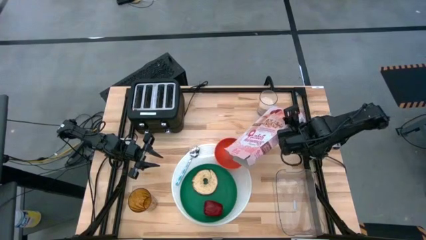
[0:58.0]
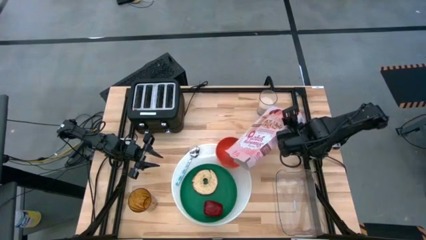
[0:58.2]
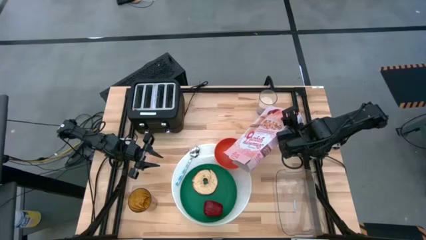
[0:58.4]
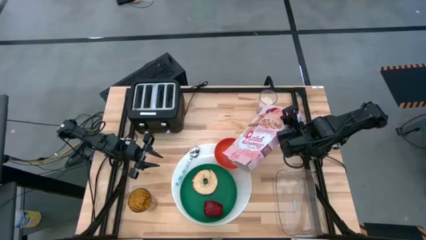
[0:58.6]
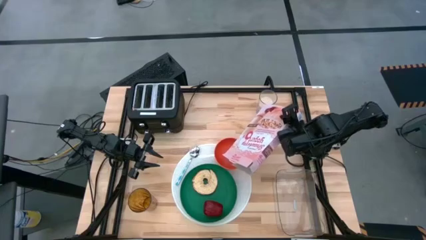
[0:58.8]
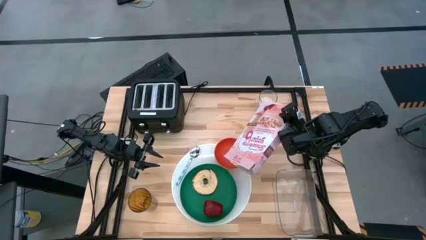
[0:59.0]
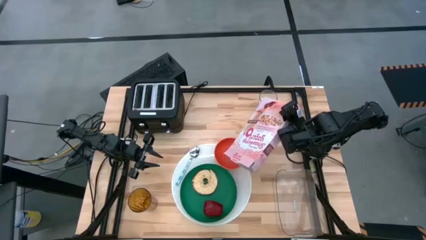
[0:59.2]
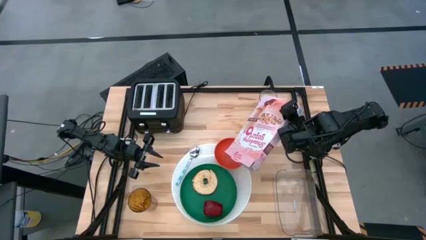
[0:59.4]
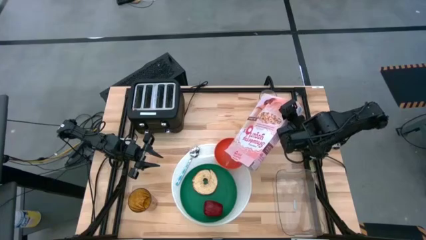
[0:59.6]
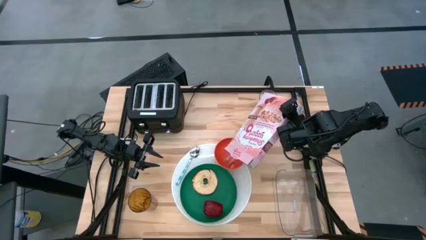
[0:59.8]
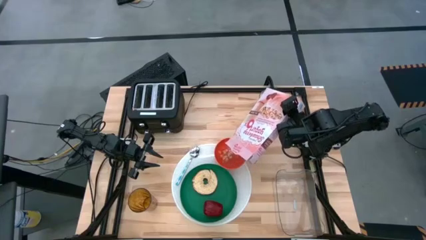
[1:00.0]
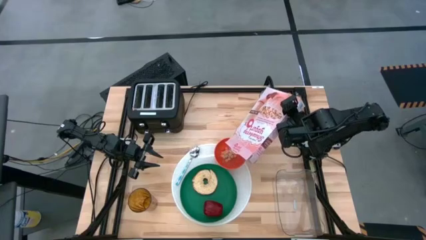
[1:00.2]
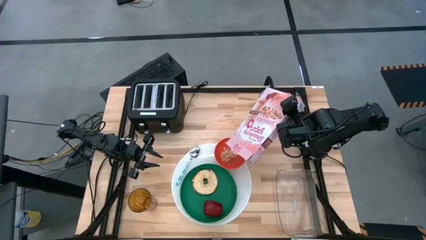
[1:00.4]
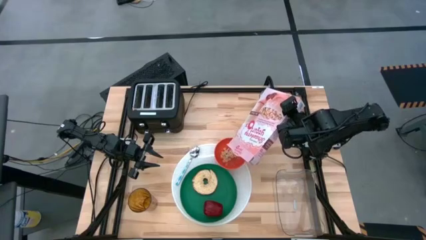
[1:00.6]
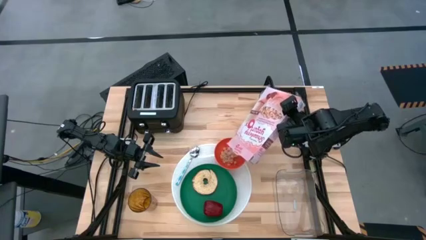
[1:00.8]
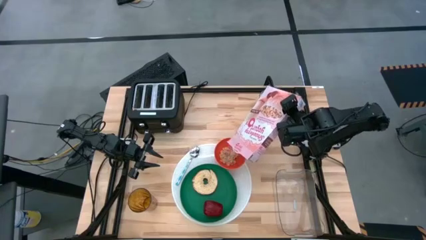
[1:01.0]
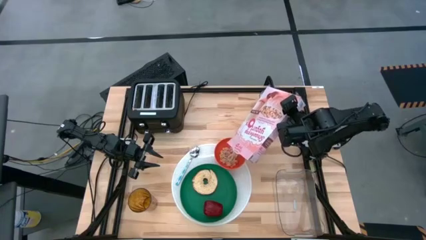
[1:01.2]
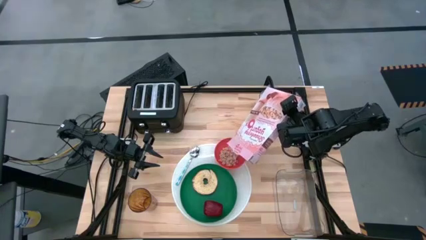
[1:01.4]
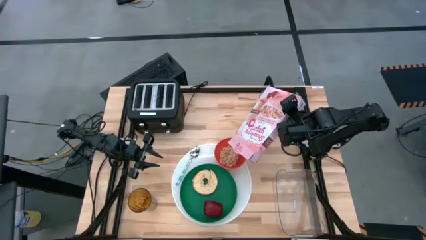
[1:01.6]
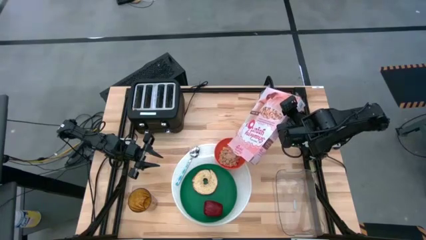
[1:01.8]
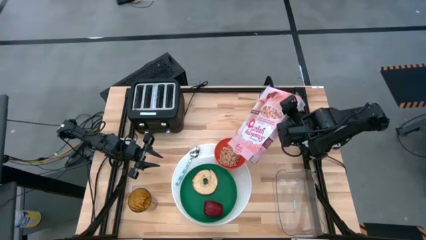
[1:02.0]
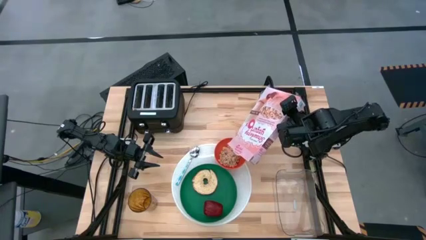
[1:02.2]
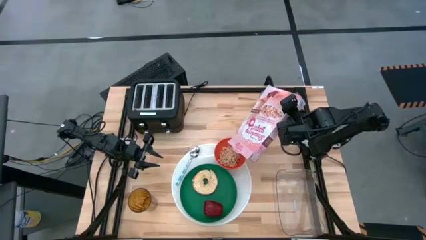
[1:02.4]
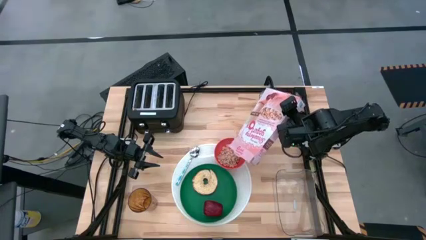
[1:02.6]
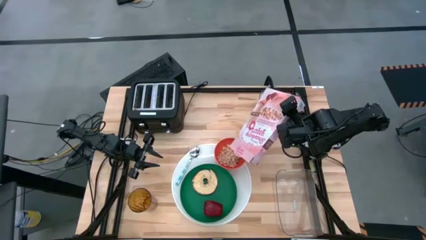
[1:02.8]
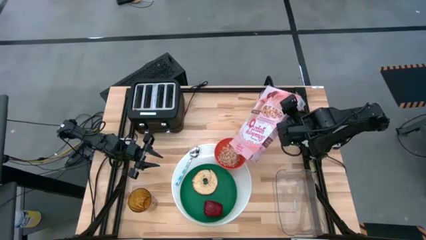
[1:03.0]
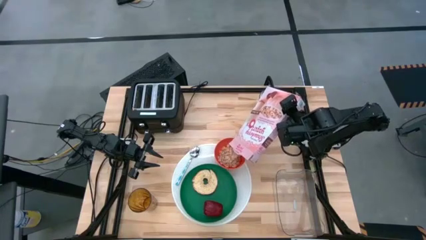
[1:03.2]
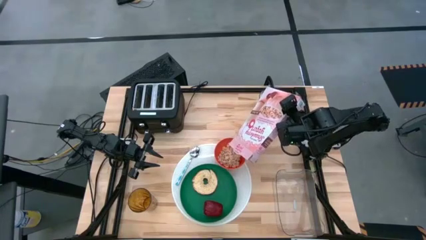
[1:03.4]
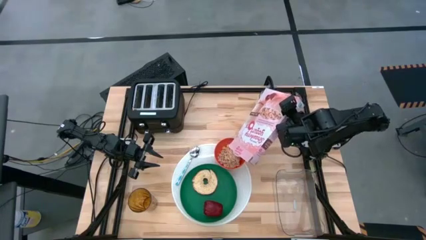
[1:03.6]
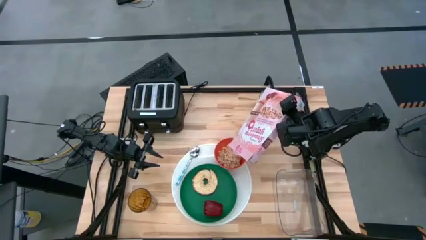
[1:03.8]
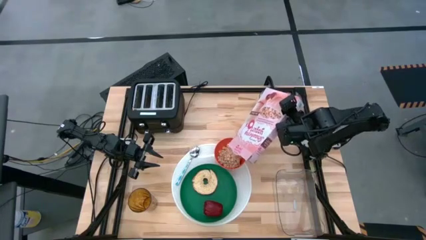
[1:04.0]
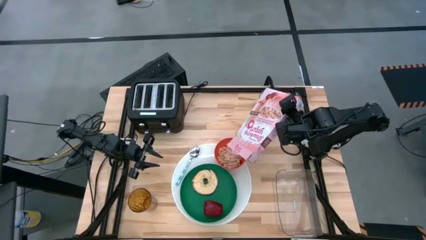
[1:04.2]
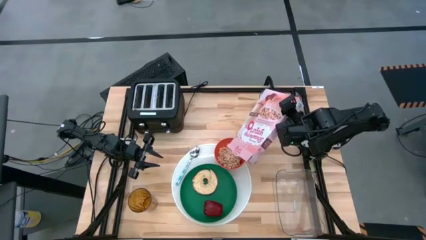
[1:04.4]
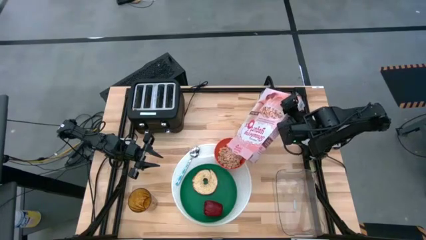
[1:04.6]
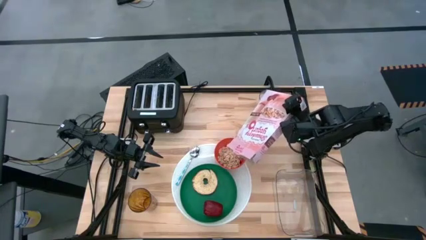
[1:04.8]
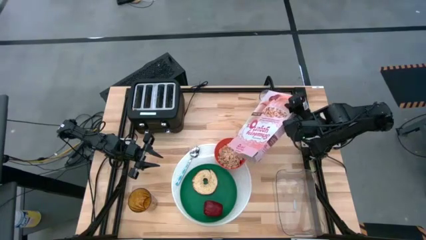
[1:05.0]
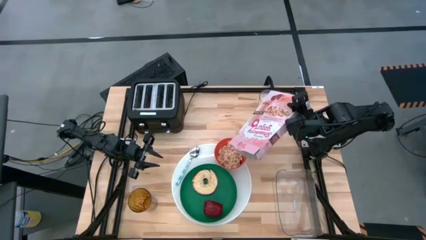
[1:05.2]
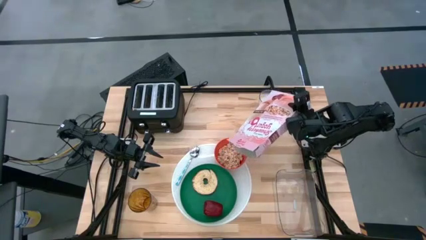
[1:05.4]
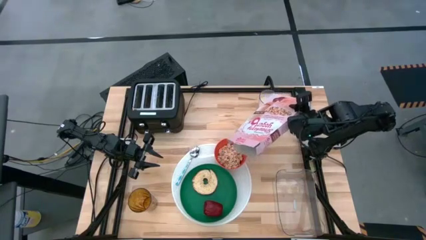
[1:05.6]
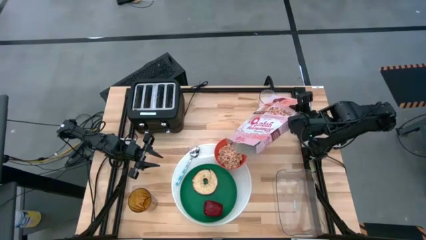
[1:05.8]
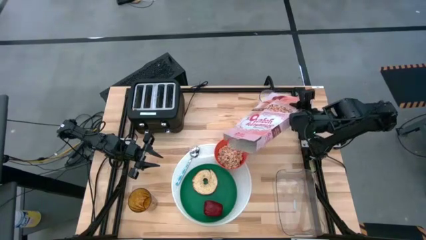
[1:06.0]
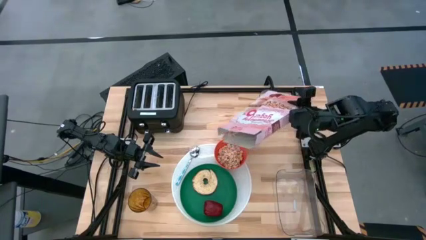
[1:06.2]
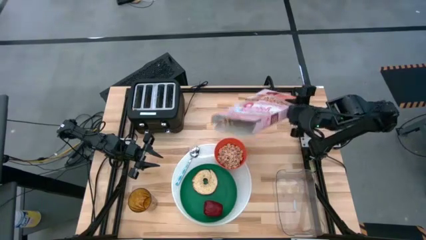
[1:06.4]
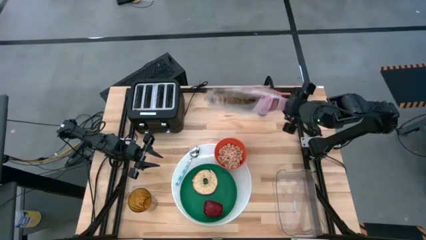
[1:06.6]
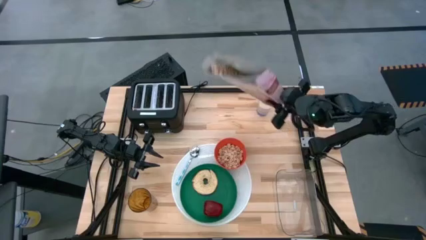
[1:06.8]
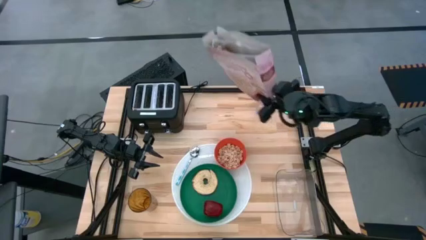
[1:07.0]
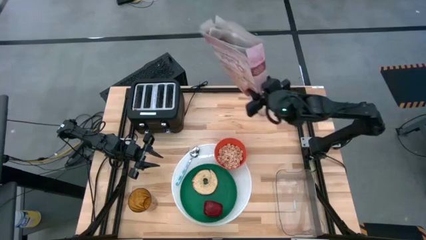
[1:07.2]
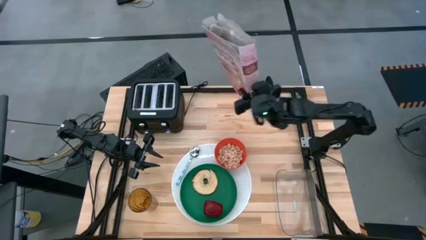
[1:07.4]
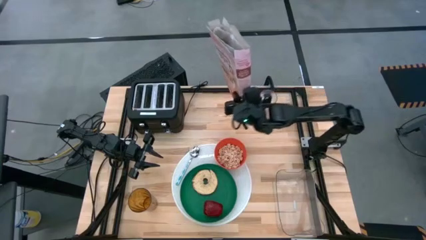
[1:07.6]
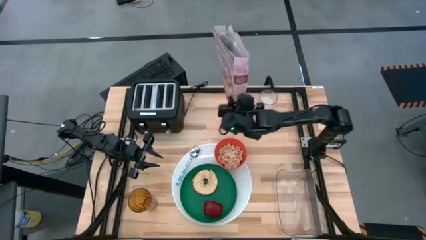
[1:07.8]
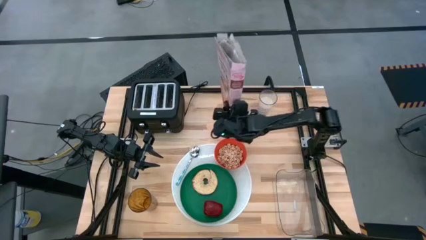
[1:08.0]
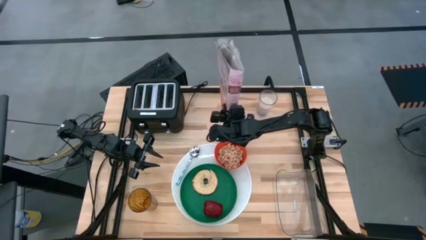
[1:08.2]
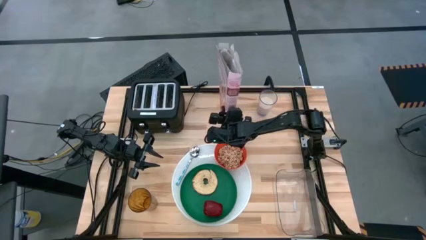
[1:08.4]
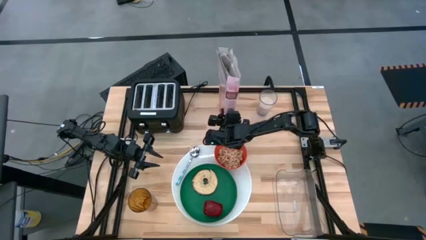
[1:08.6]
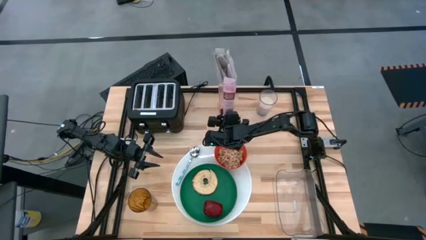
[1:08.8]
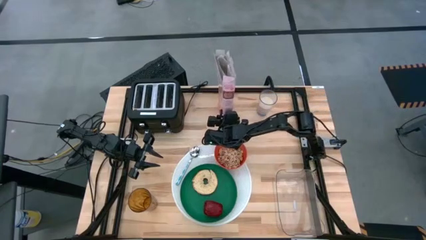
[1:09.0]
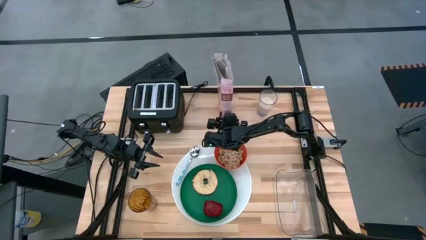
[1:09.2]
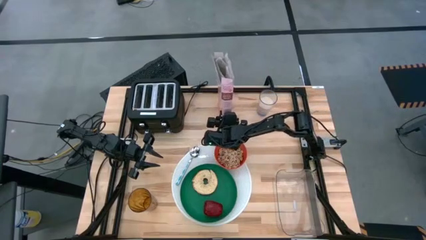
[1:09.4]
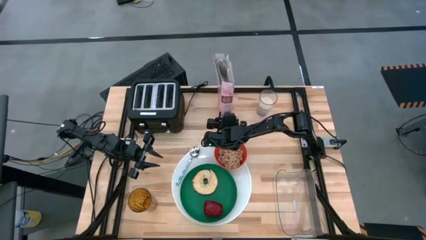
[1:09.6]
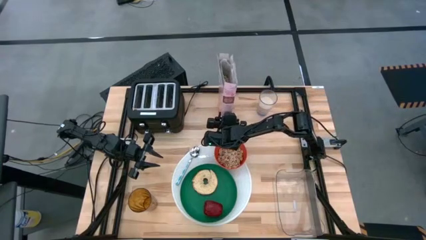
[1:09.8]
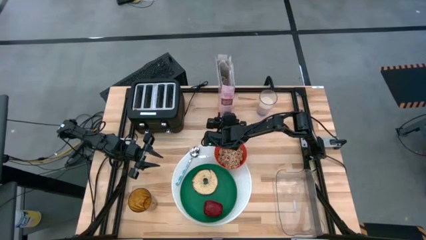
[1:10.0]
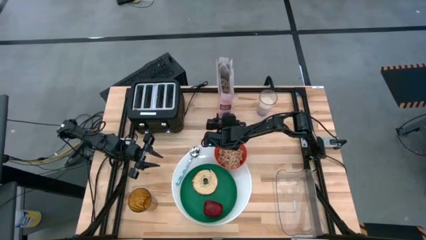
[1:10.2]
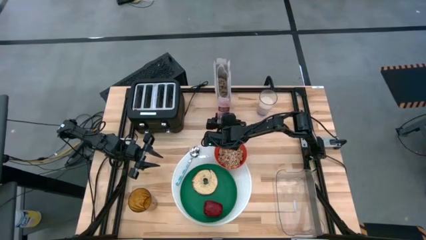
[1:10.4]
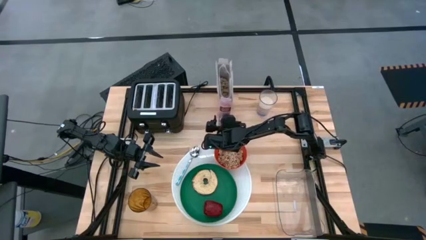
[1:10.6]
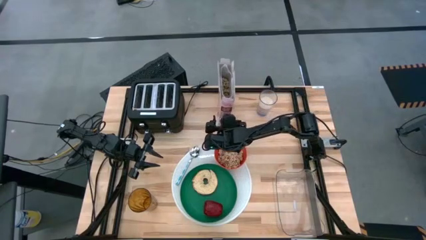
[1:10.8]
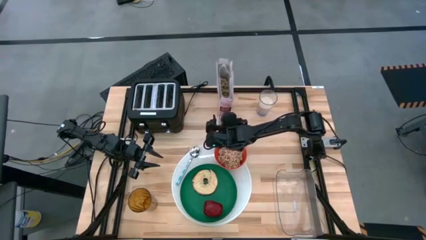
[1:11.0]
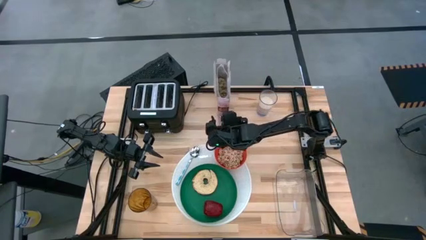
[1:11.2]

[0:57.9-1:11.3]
Task: Arrange a breakfast setting
Pour the cereal from the cereal box into the orange bowl
